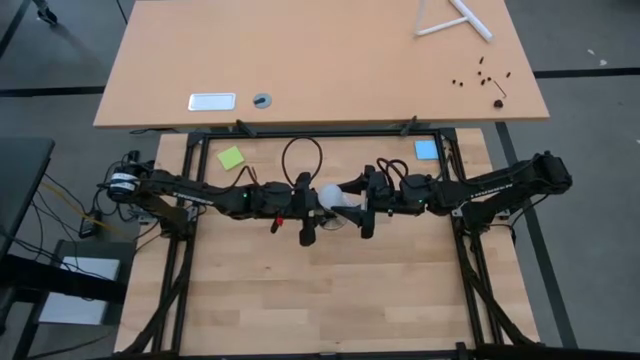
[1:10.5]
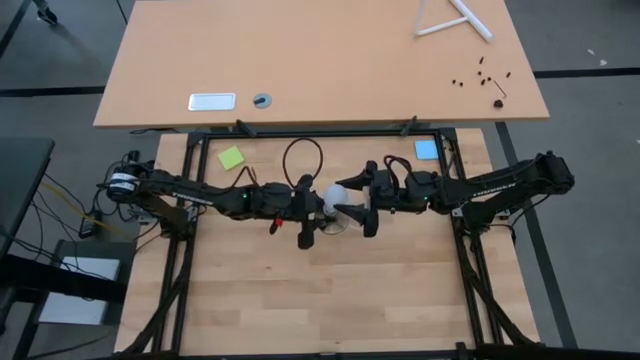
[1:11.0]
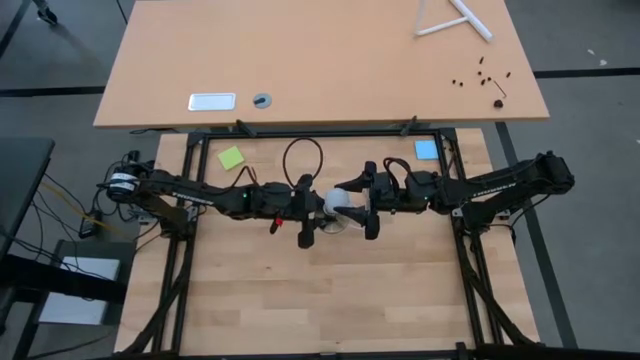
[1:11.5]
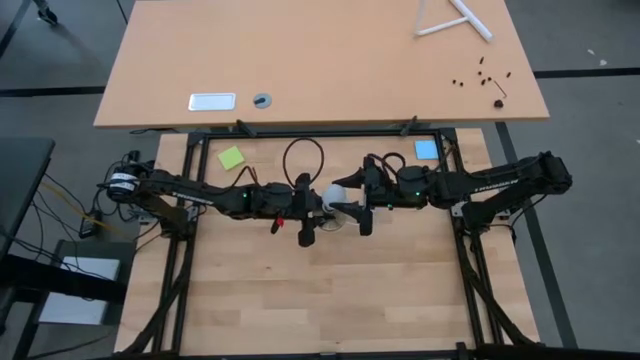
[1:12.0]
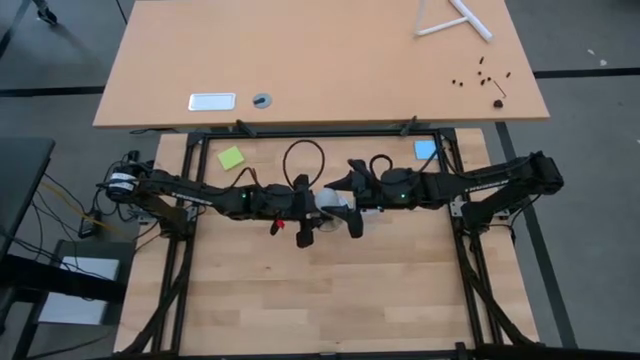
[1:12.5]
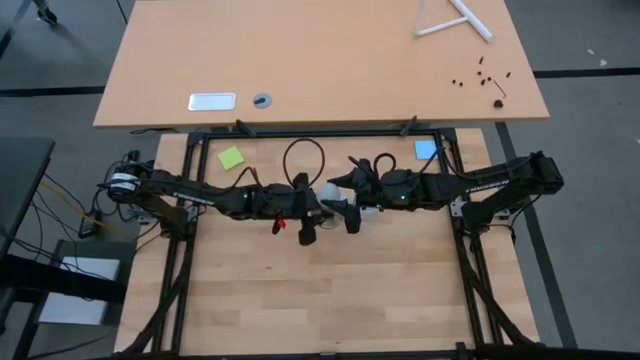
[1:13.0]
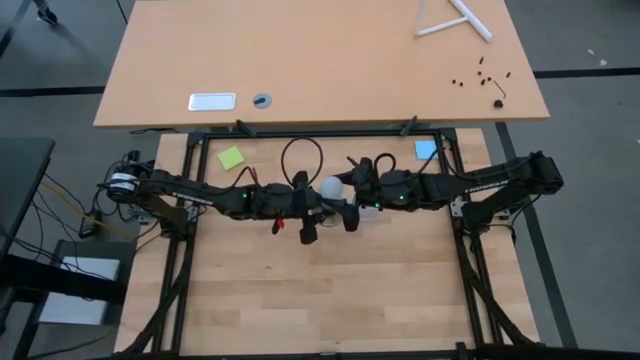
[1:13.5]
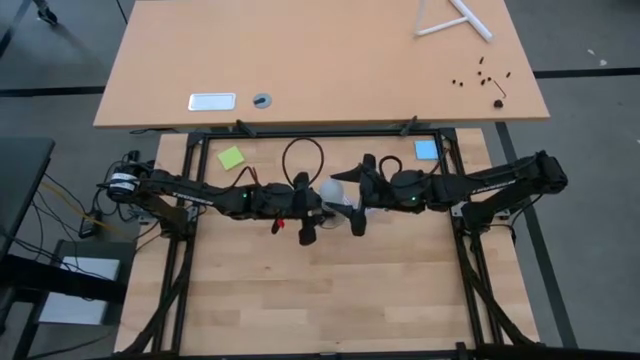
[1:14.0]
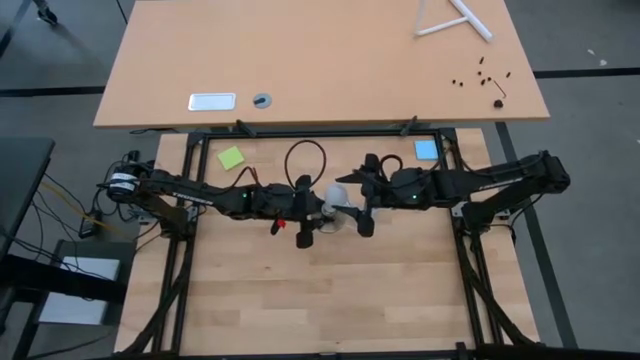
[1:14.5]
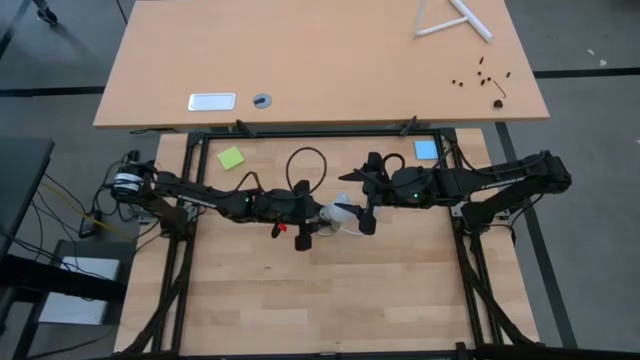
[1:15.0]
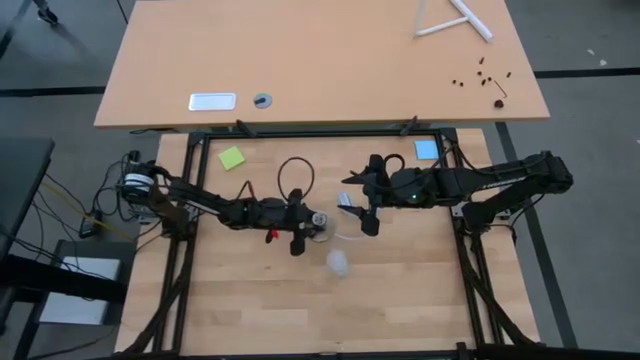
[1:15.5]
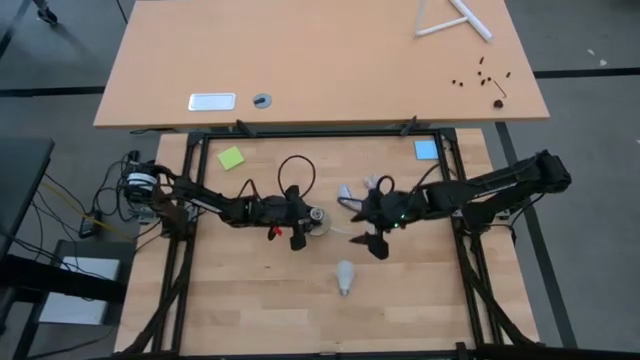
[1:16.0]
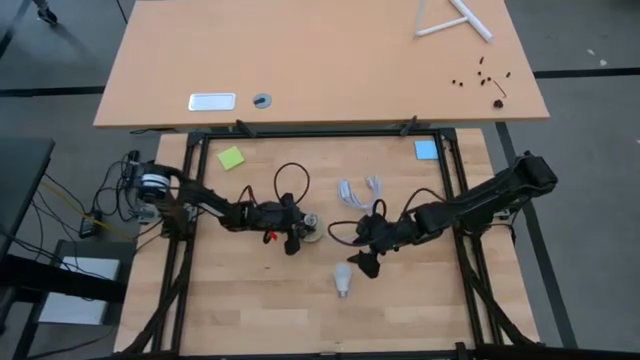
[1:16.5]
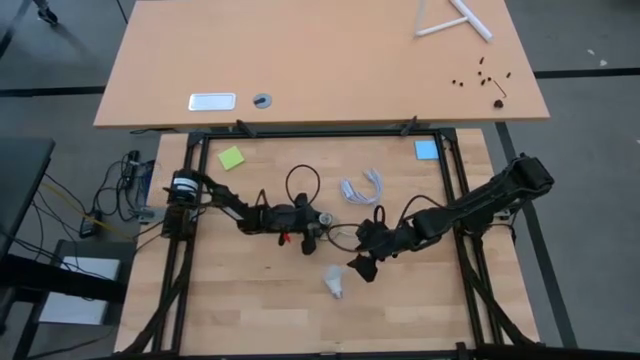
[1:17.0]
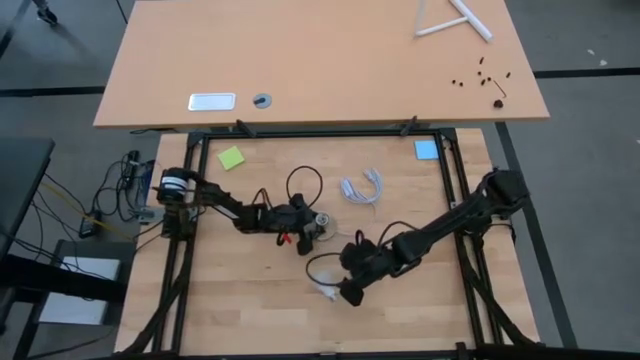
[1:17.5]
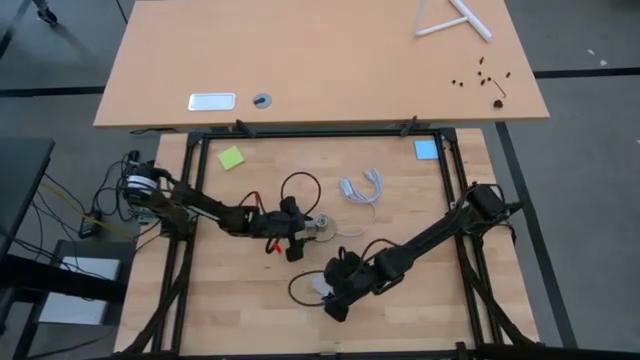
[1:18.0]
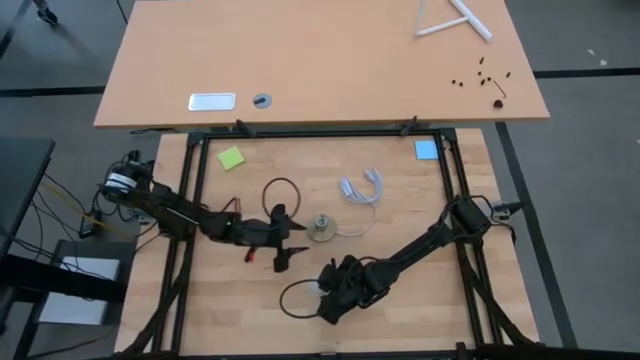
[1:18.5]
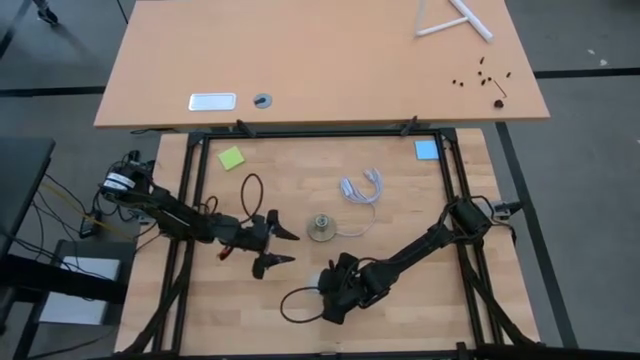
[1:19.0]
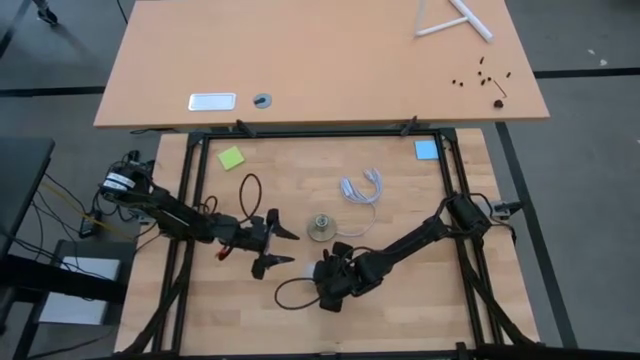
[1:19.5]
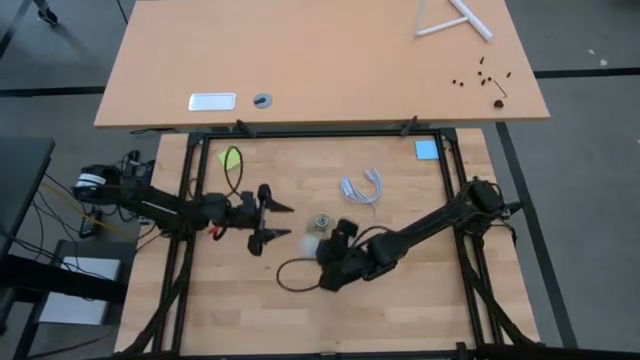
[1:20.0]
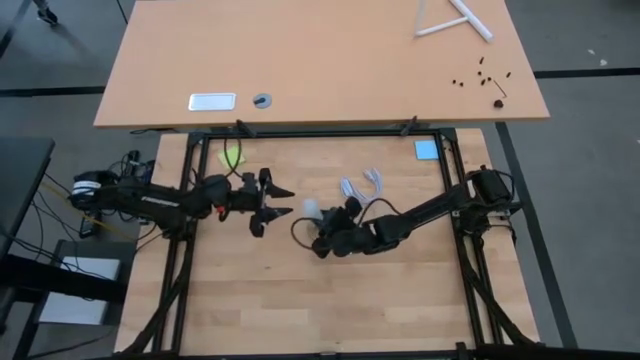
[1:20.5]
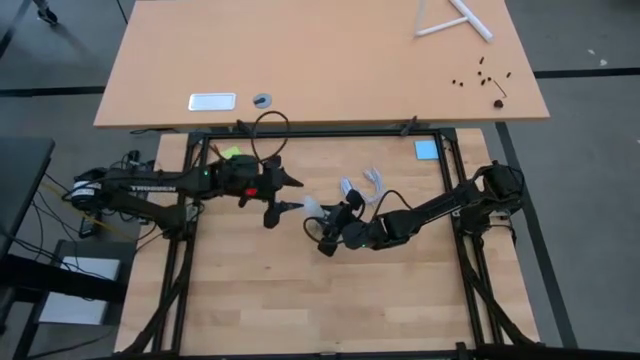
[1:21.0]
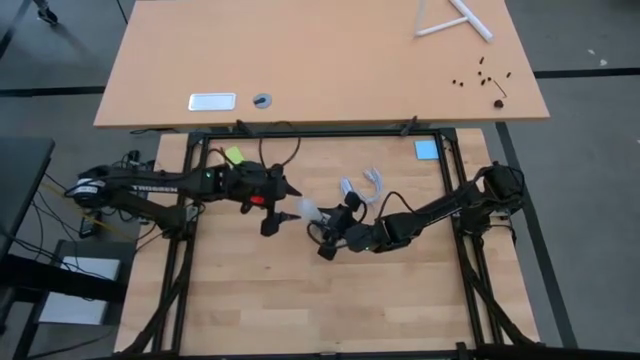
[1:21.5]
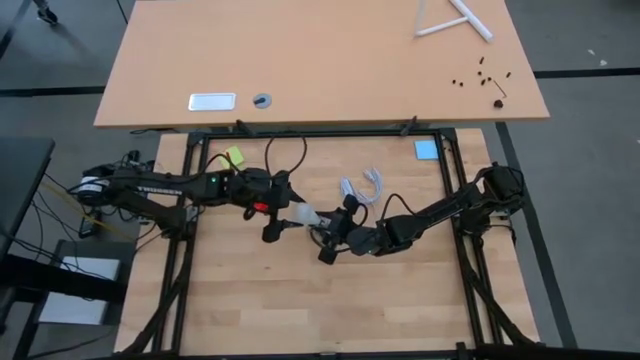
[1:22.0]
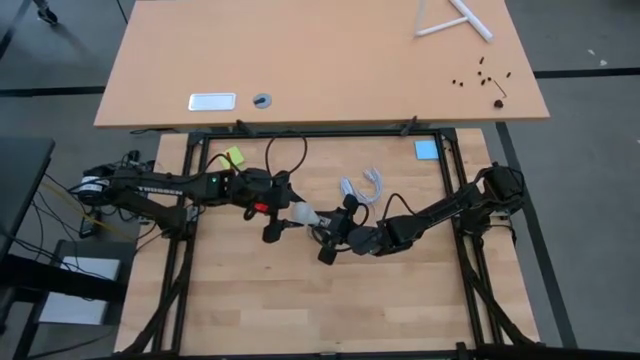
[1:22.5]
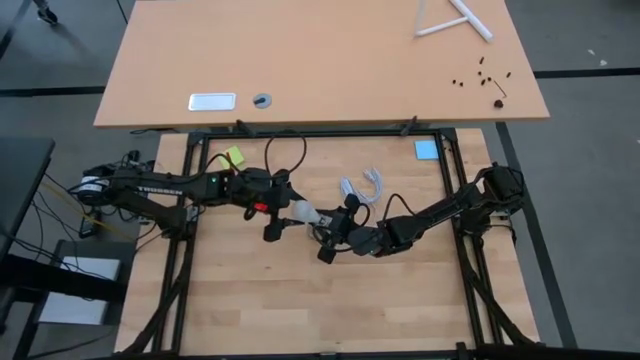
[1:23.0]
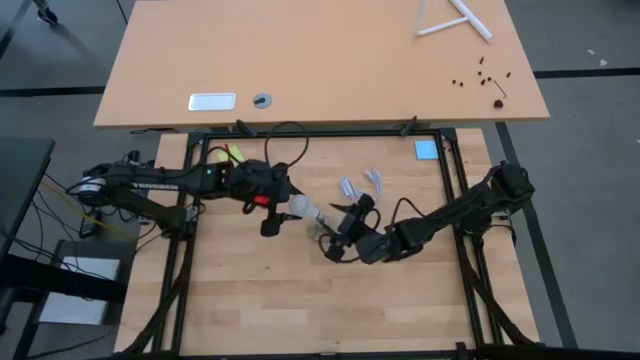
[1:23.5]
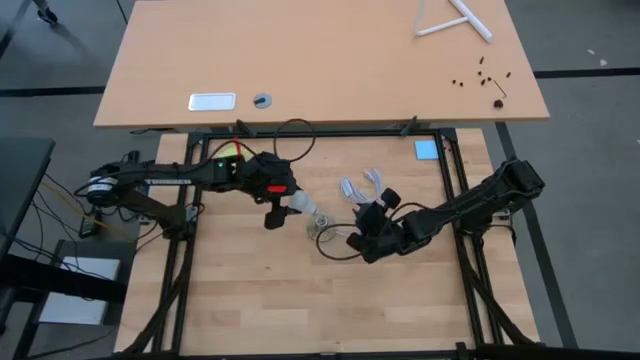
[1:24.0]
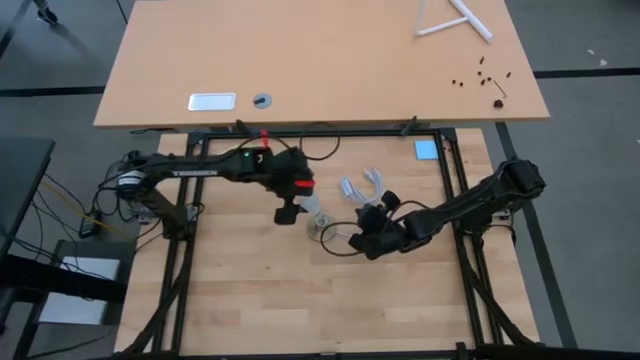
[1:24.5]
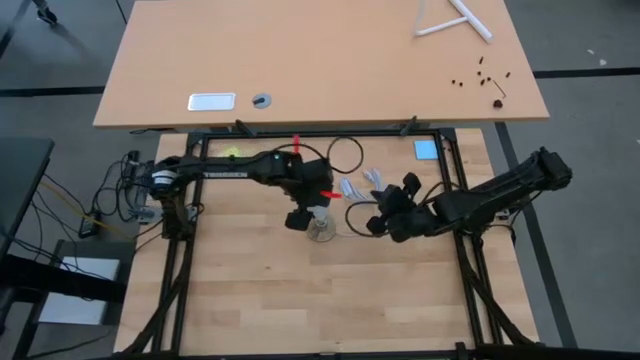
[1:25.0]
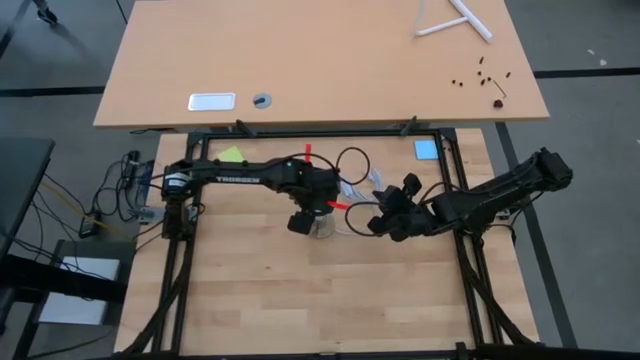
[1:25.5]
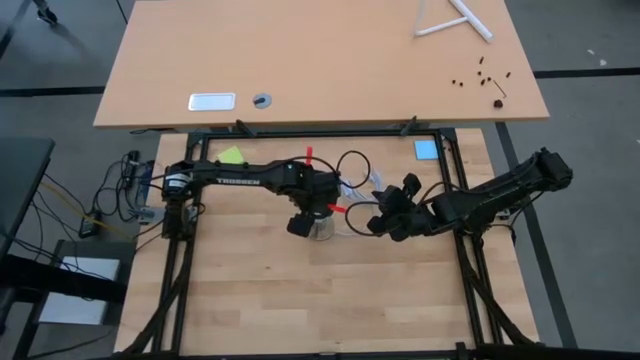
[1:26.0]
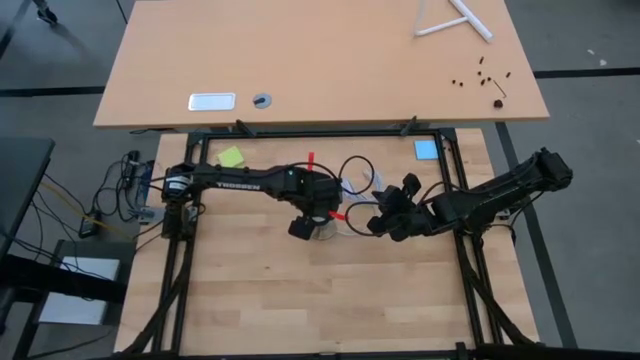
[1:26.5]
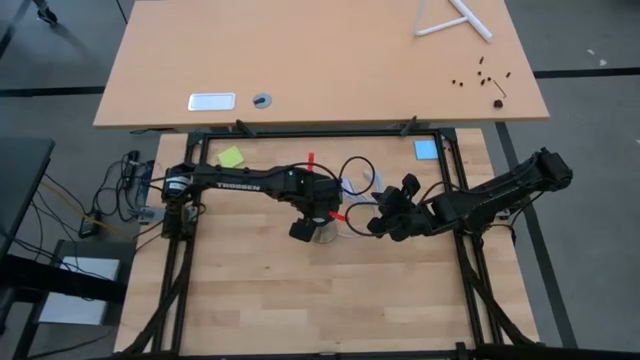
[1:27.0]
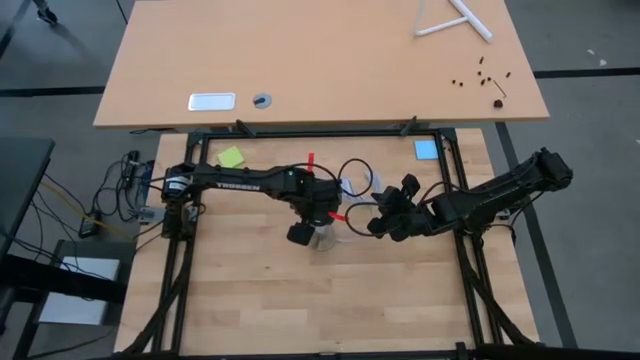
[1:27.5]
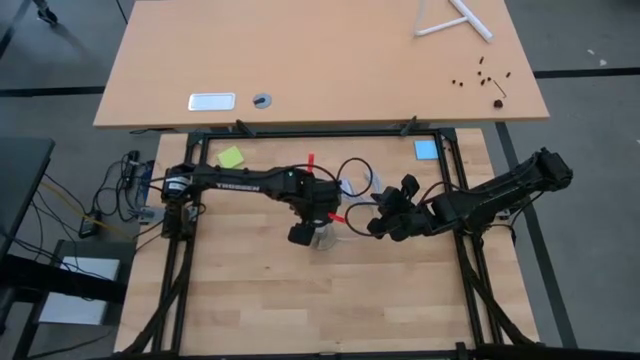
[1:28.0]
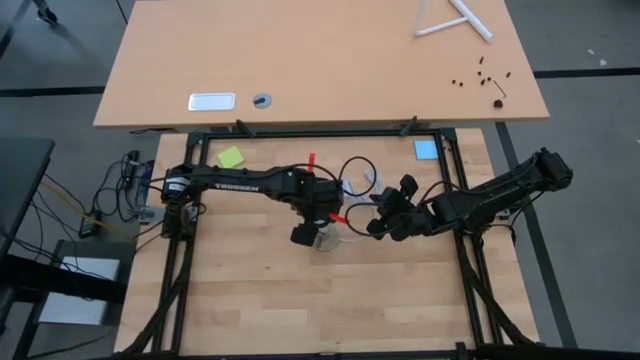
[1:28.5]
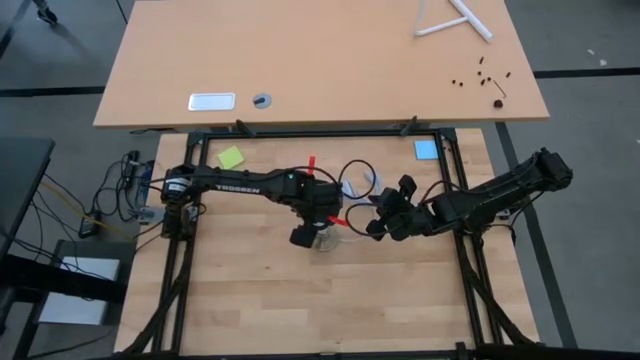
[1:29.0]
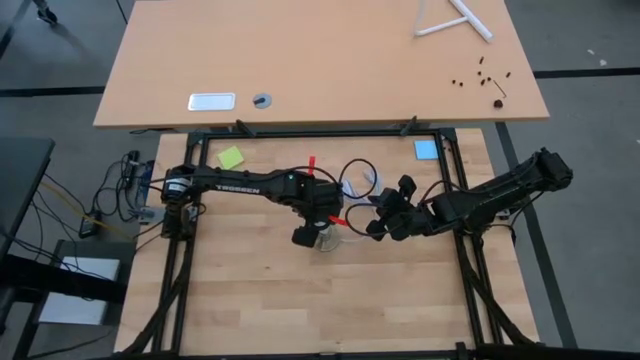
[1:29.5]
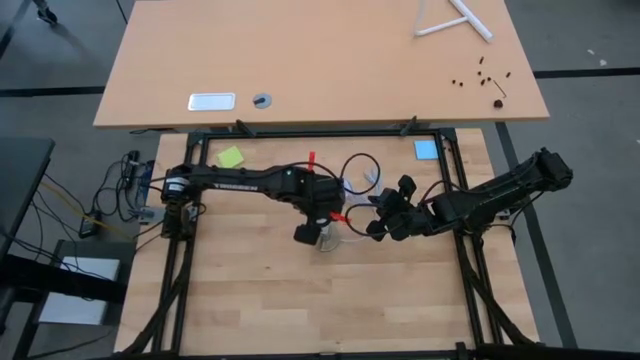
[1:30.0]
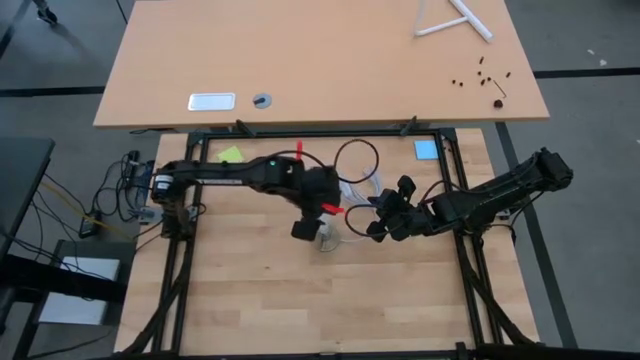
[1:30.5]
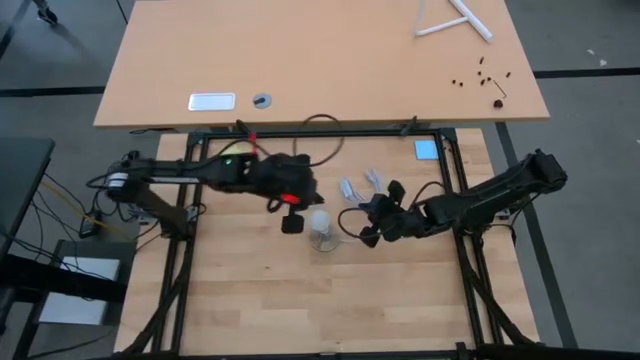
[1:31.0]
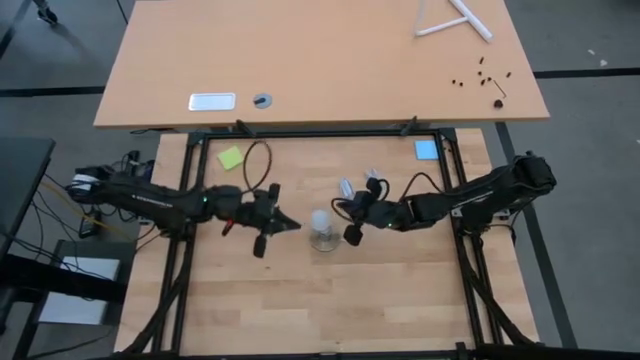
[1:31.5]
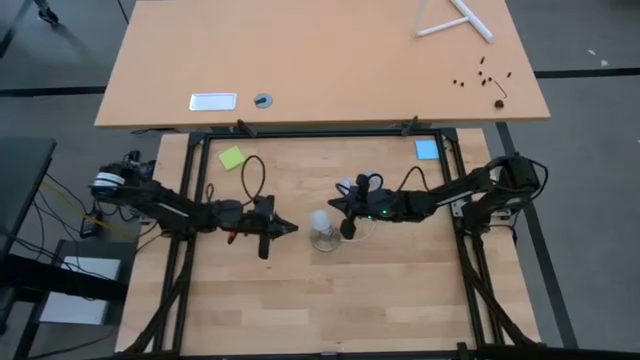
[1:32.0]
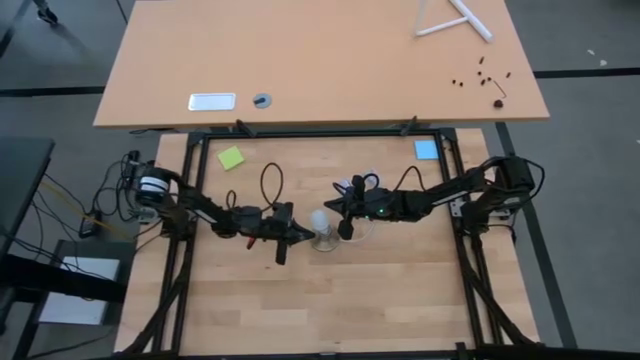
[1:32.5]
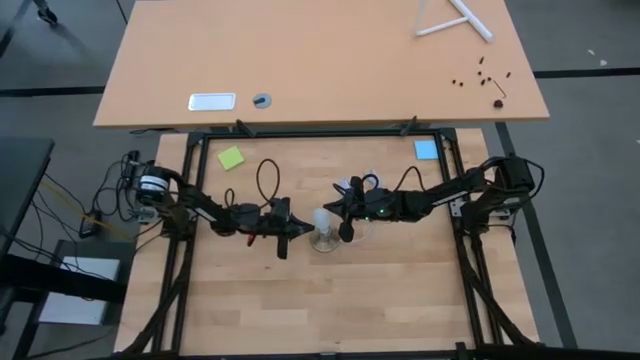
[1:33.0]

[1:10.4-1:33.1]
Task: Screw lightbulb
Insert the lightbulb into the lamp
